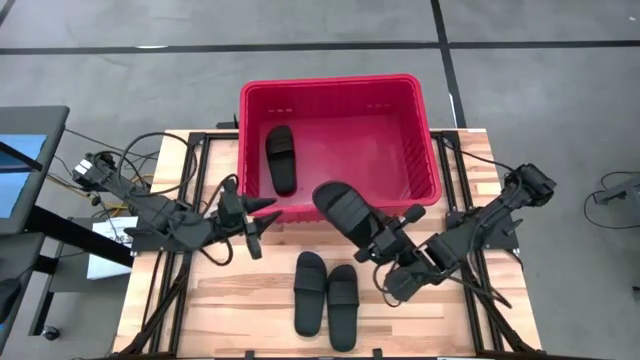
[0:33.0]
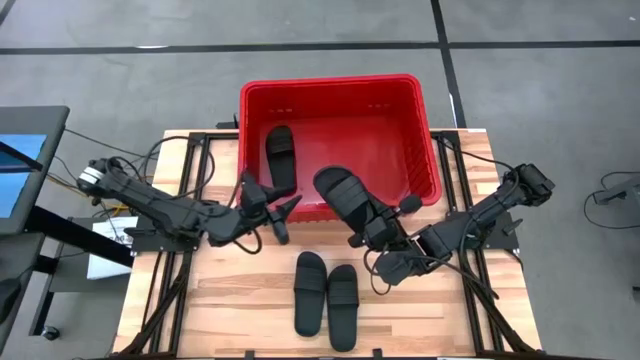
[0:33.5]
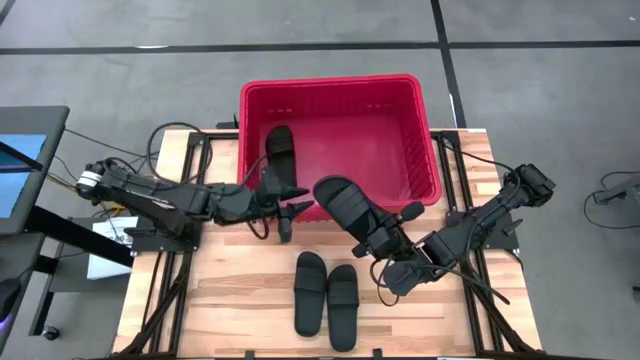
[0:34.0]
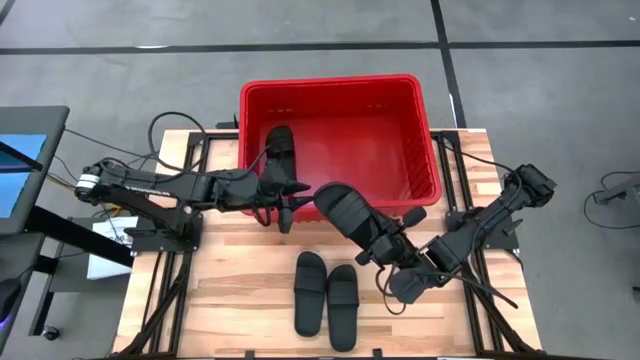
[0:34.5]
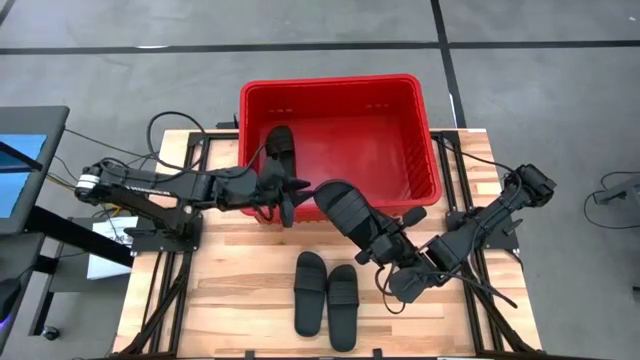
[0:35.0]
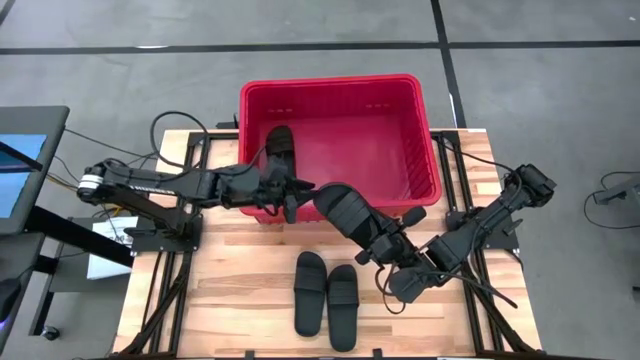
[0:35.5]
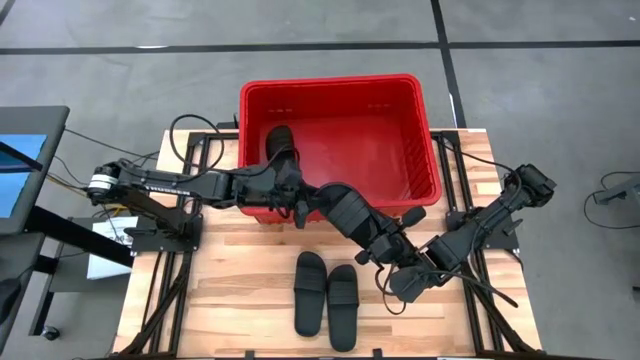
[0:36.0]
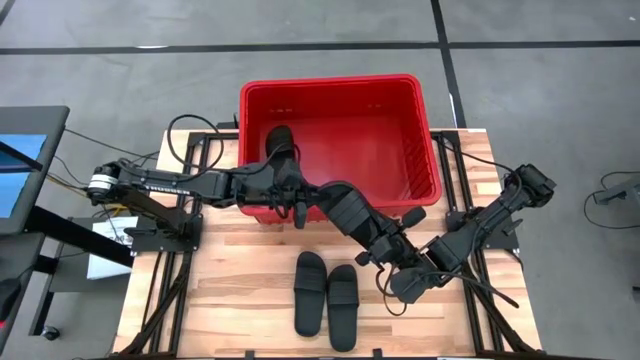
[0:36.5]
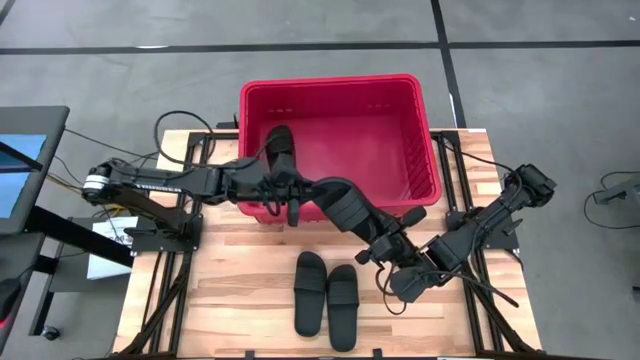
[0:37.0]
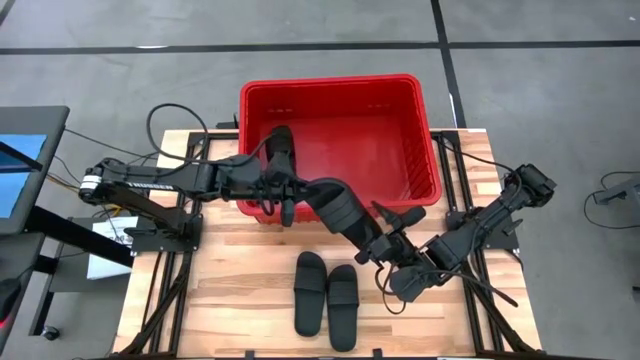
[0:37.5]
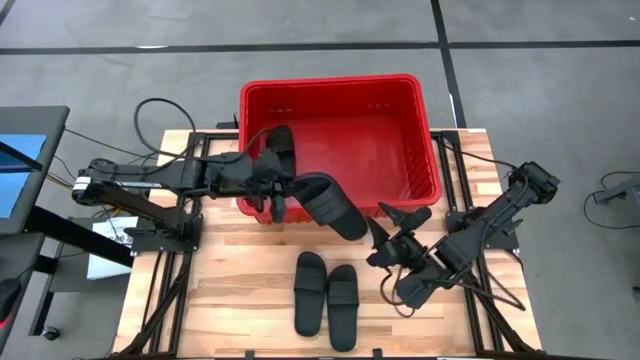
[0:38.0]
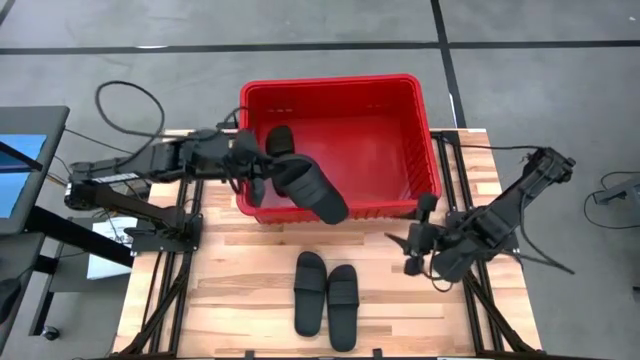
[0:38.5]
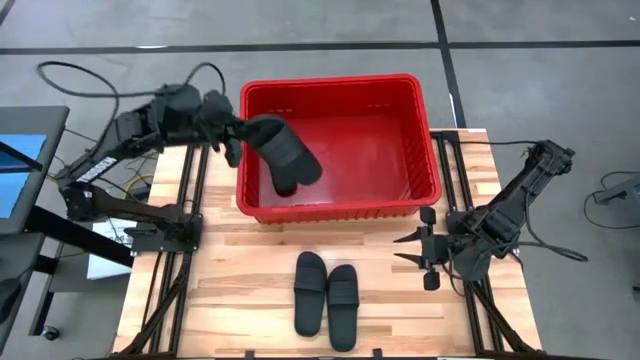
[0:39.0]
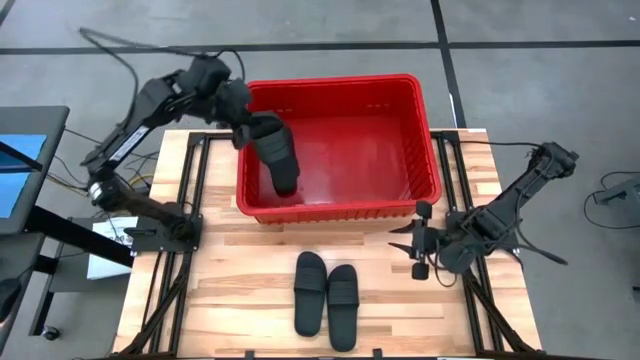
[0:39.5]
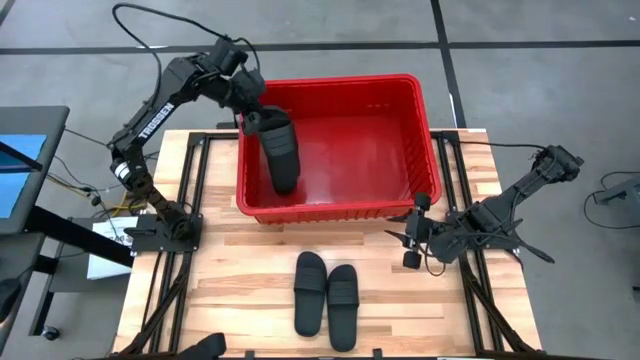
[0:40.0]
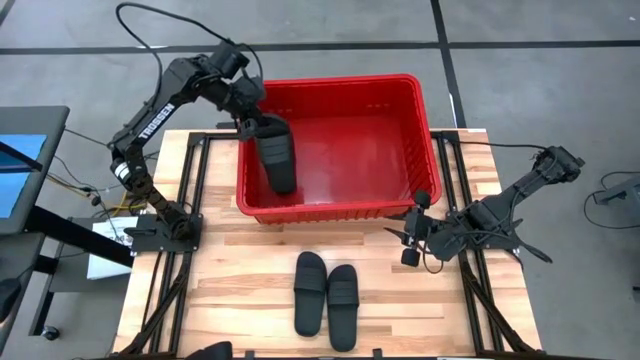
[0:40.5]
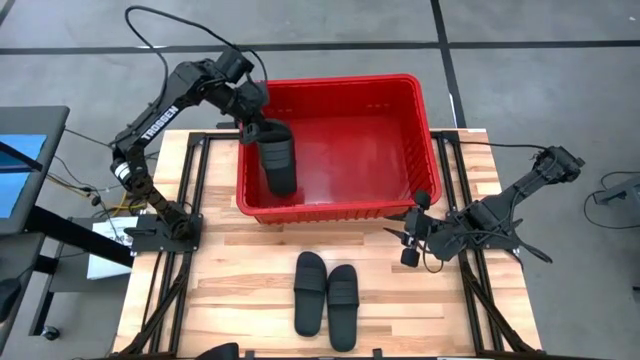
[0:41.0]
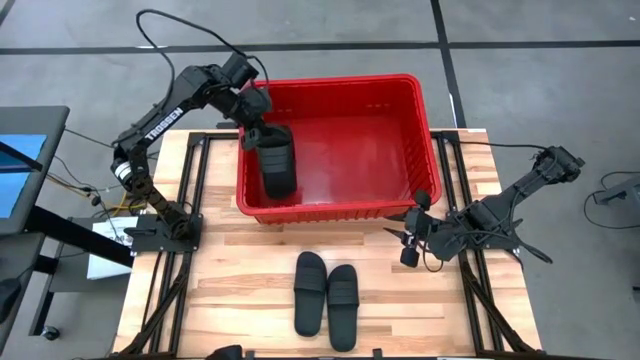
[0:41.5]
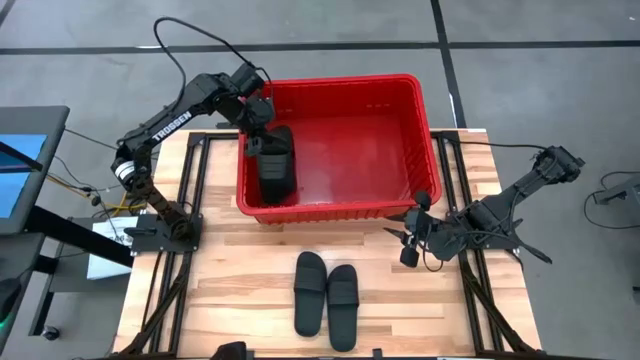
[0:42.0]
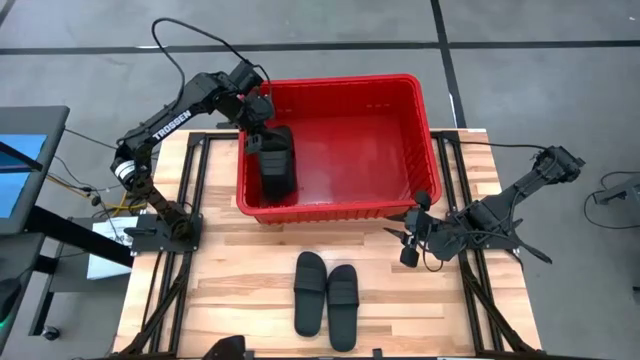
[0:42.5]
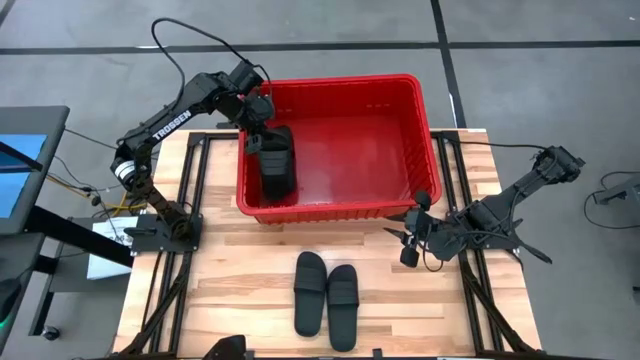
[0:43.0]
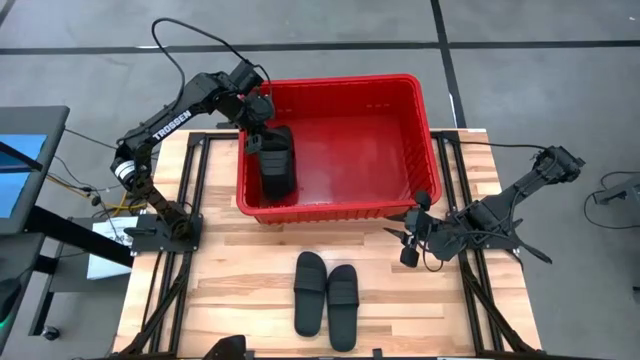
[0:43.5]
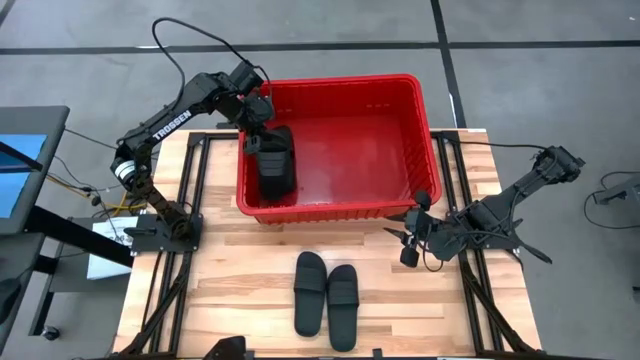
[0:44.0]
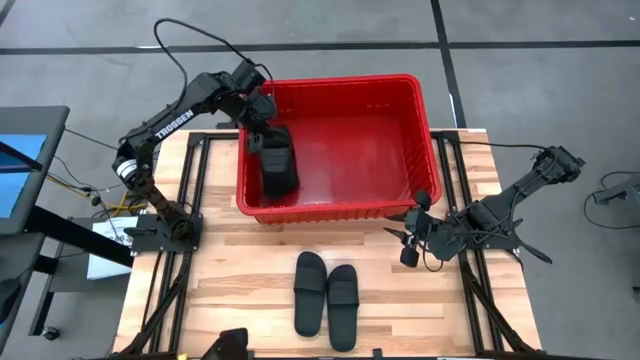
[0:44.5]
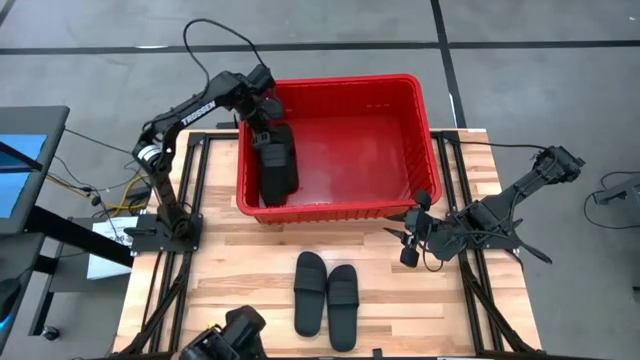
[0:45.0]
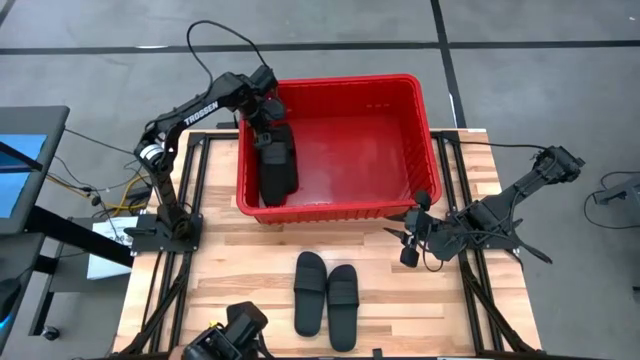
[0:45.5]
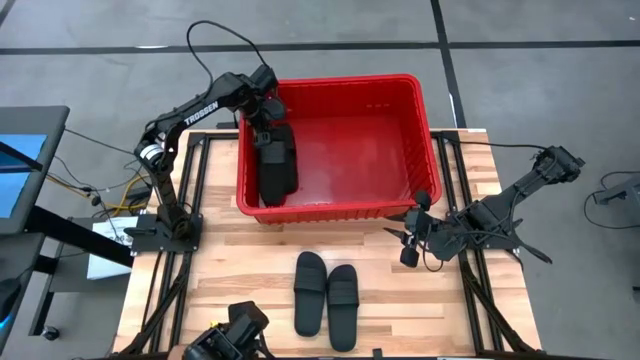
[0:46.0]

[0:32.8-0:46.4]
Task: Pick and place slides into bin
Put the black slides into the red bin

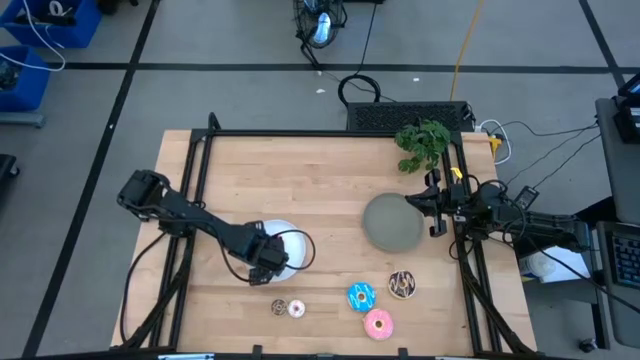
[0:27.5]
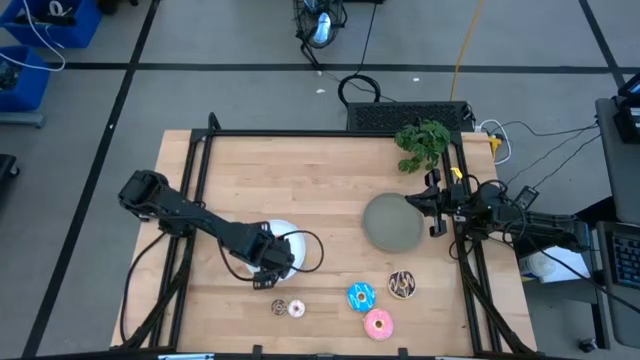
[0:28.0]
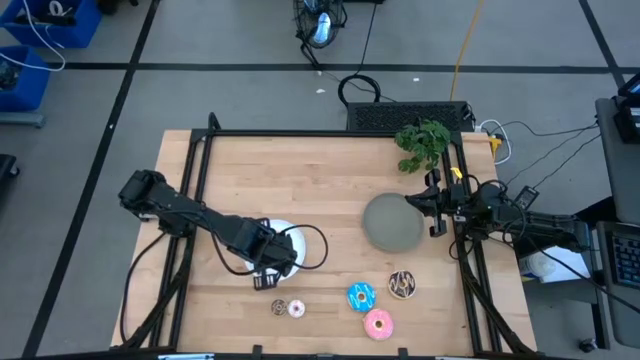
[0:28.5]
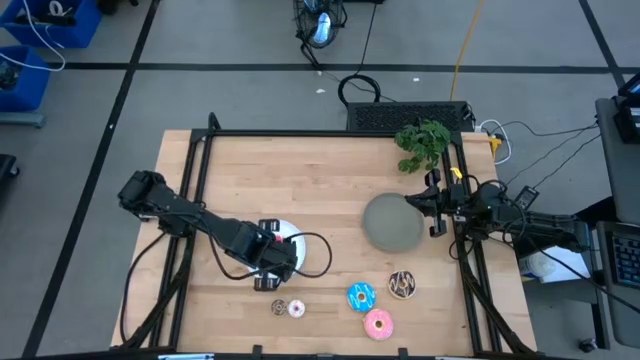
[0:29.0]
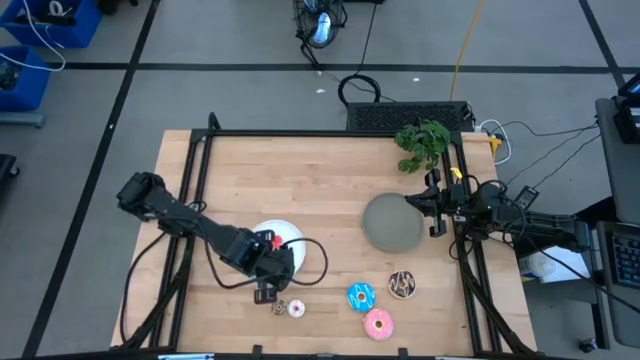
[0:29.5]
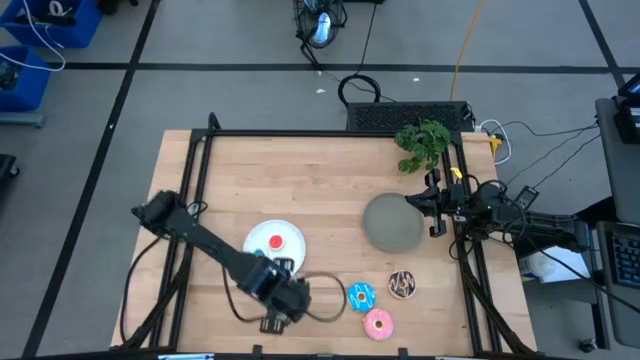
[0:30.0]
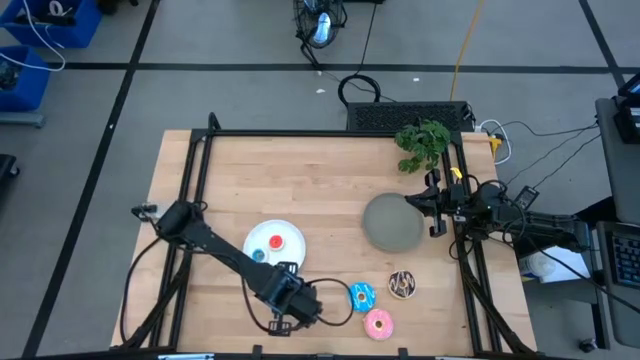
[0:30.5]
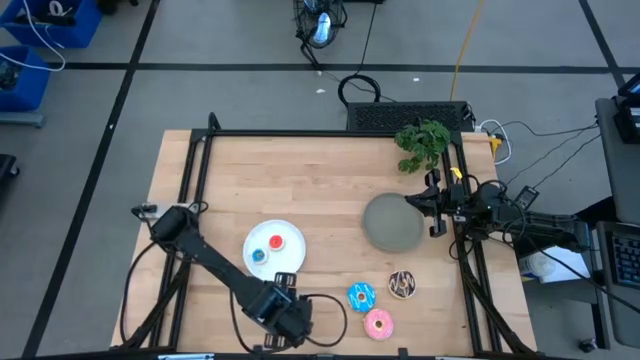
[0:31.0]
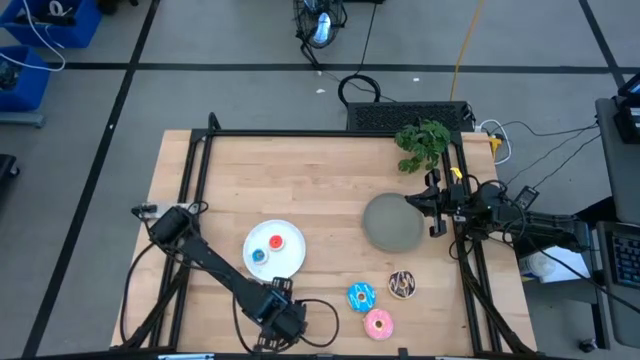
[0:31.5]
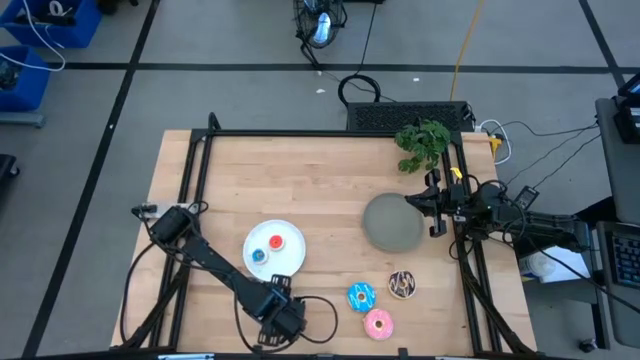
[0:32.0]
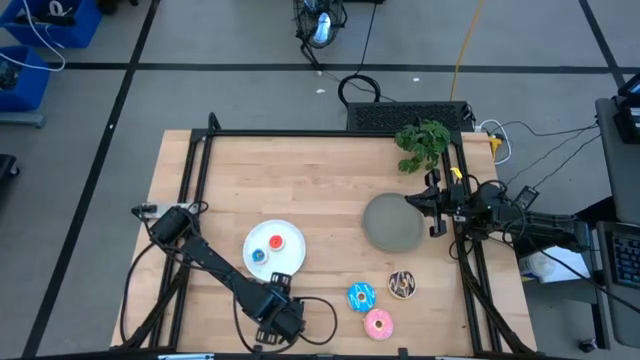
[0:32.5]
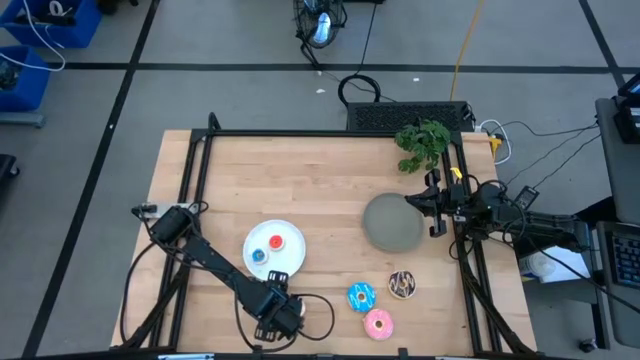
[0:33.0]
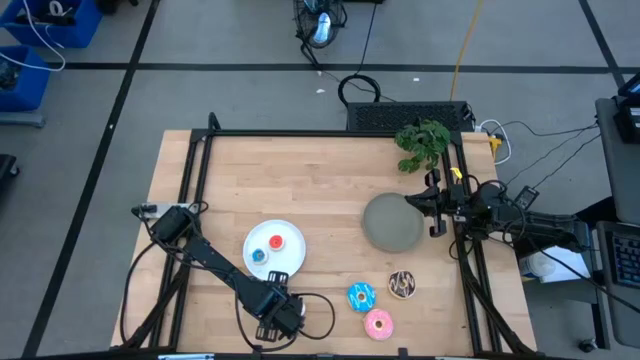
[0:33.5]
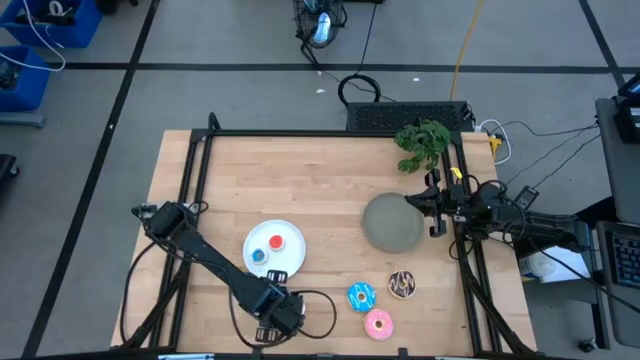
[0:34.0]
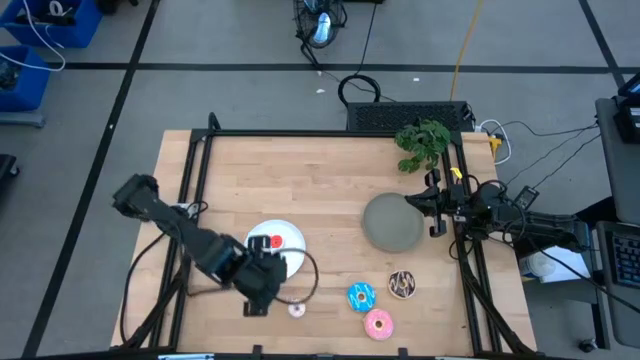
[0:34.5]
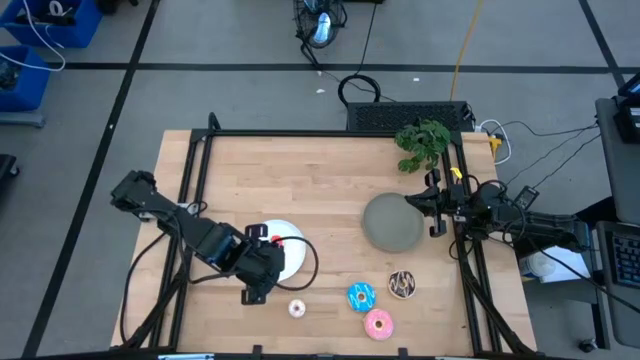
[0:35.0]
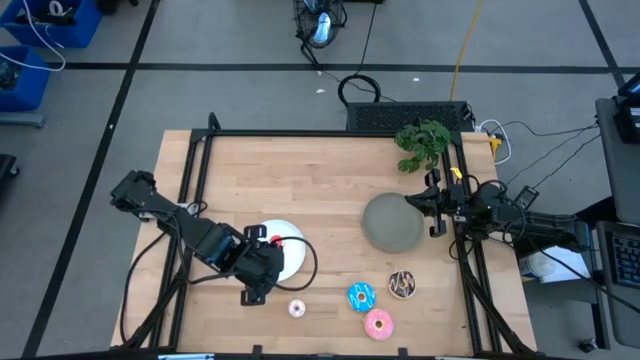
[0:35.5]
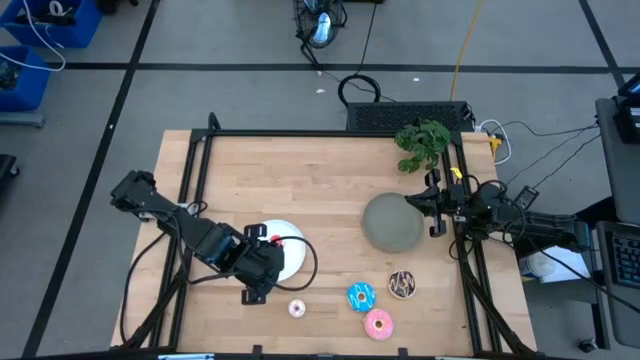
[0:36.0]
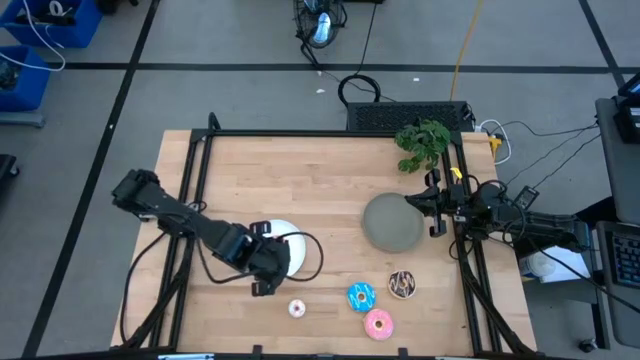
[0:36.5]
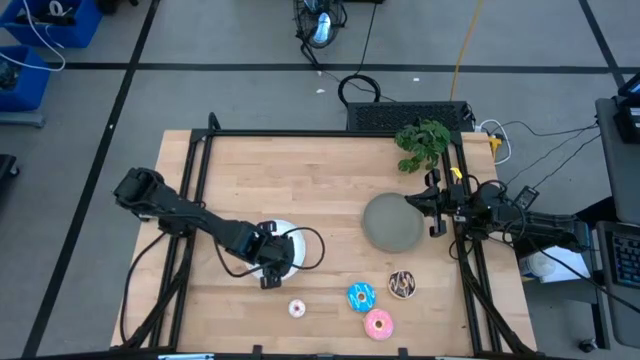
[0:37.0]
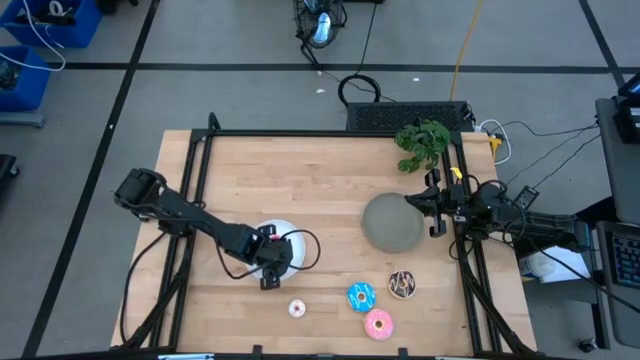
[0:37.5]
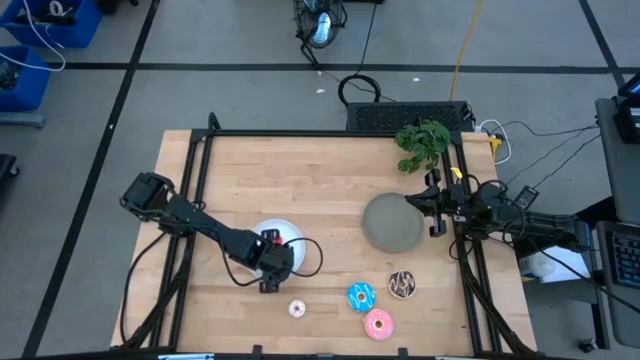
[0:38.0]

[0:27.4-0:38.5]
Task: Pick & Place donuts
Put the small brown donut on the white plate
